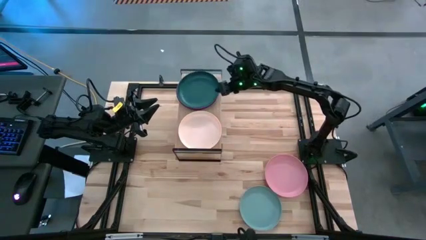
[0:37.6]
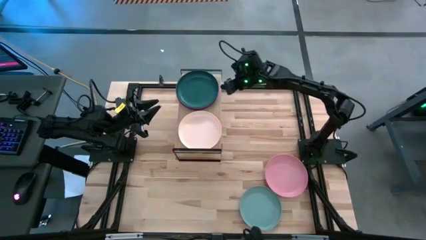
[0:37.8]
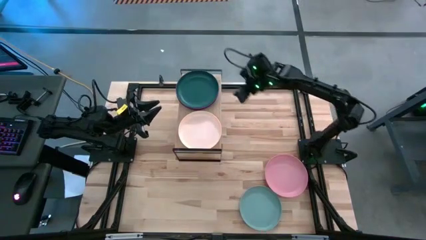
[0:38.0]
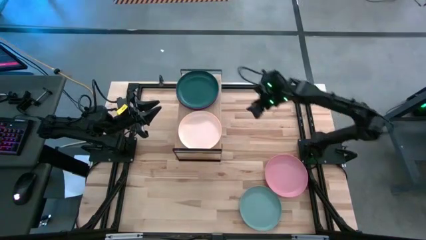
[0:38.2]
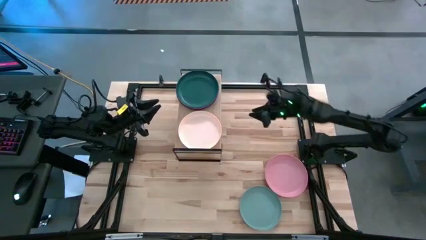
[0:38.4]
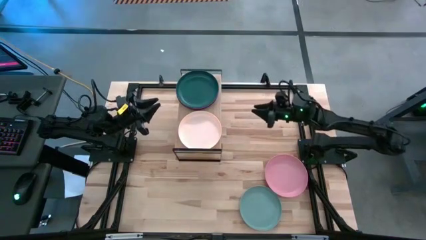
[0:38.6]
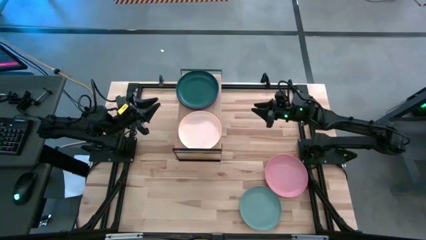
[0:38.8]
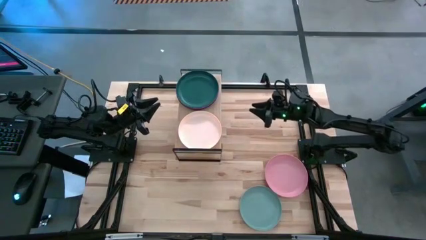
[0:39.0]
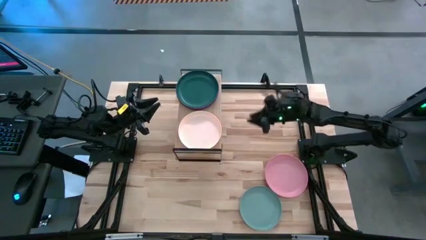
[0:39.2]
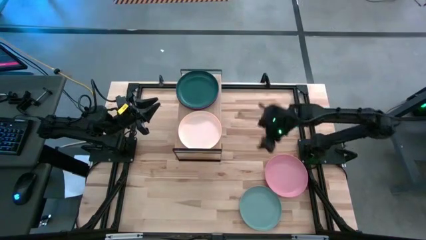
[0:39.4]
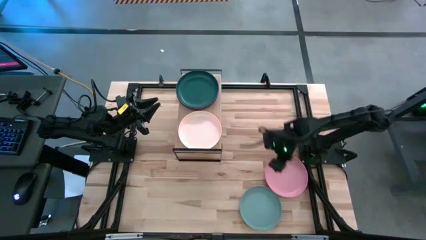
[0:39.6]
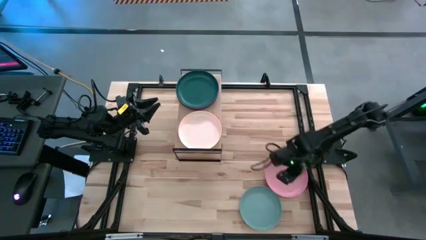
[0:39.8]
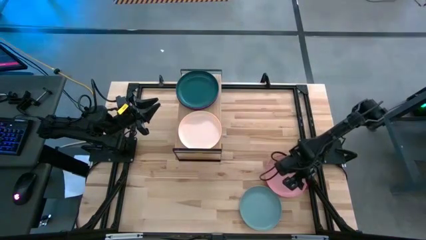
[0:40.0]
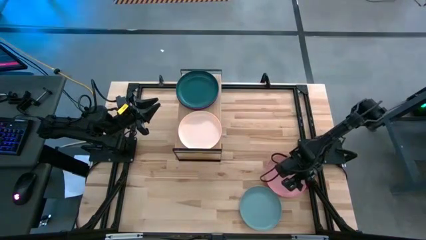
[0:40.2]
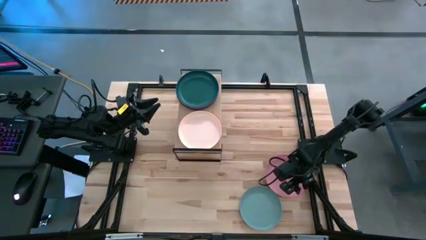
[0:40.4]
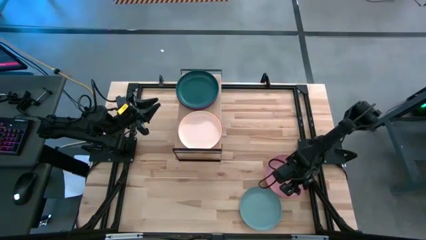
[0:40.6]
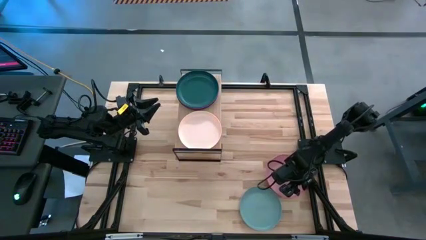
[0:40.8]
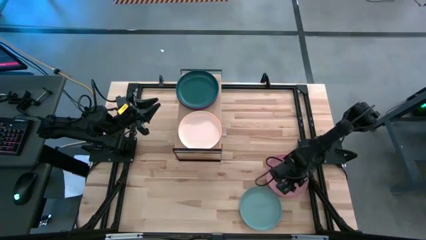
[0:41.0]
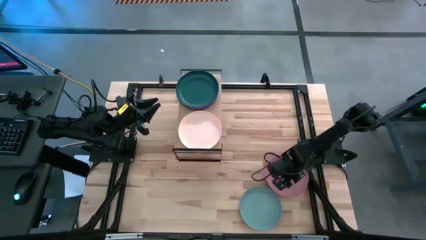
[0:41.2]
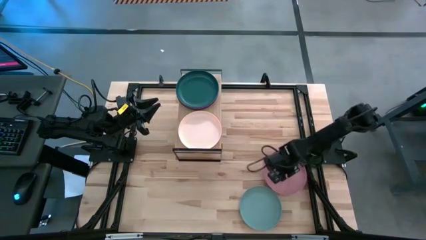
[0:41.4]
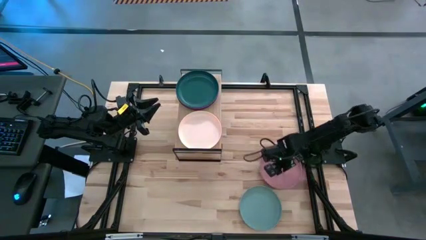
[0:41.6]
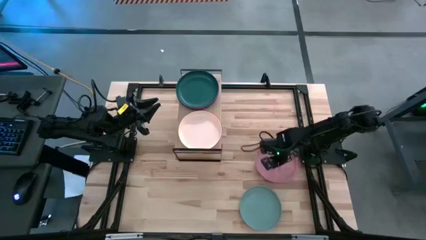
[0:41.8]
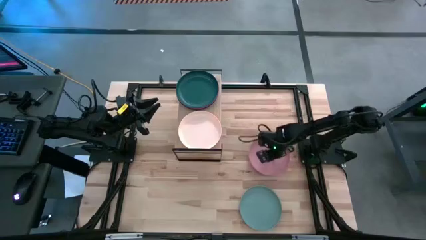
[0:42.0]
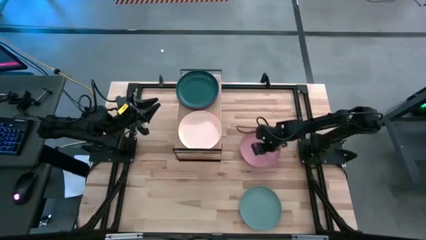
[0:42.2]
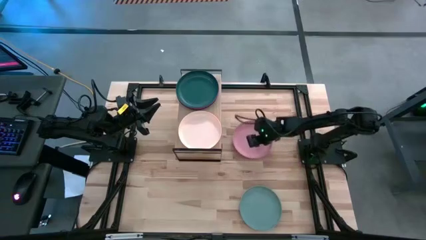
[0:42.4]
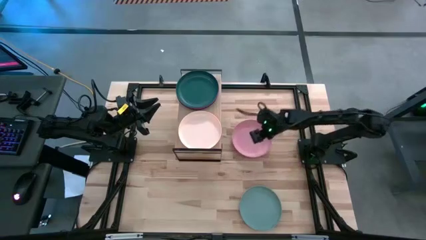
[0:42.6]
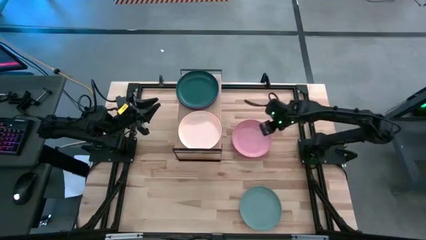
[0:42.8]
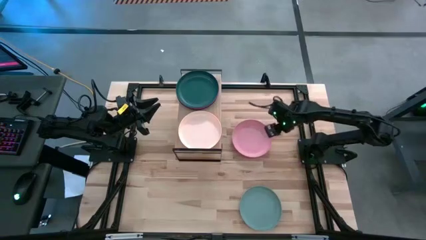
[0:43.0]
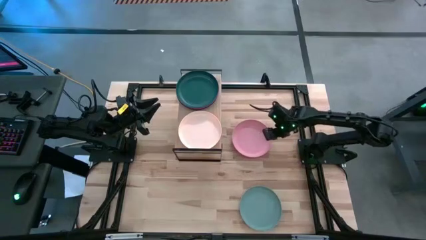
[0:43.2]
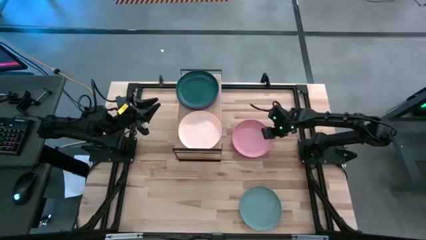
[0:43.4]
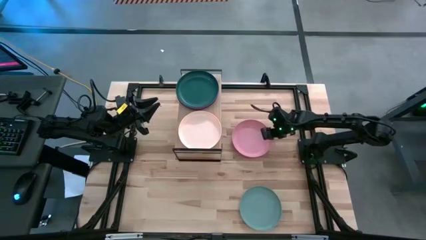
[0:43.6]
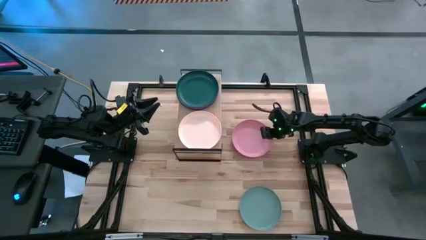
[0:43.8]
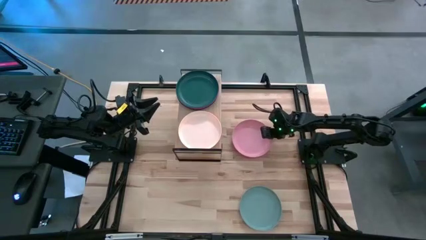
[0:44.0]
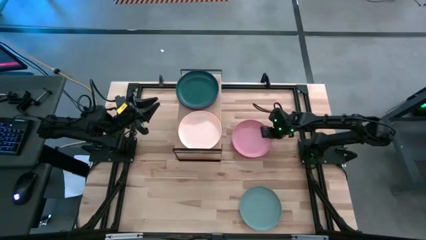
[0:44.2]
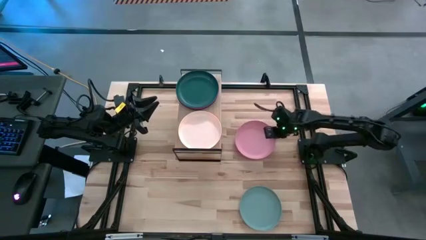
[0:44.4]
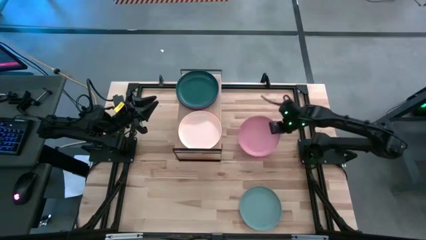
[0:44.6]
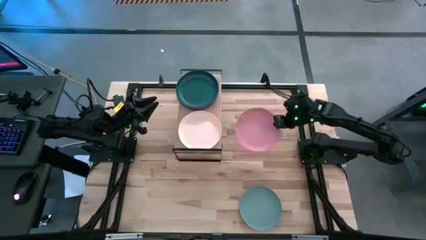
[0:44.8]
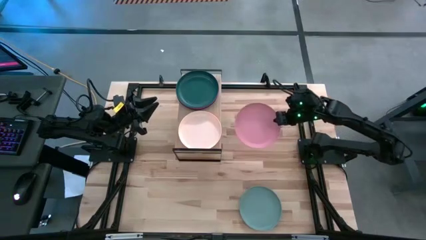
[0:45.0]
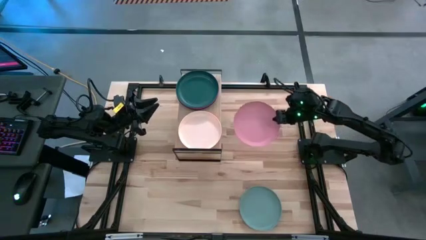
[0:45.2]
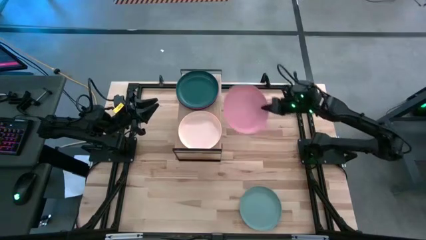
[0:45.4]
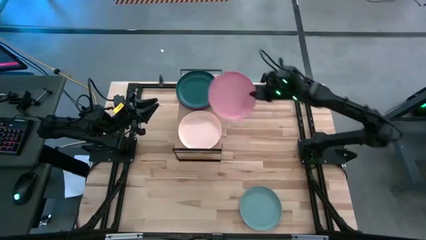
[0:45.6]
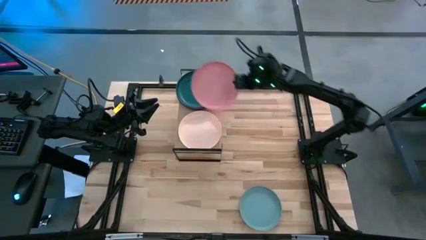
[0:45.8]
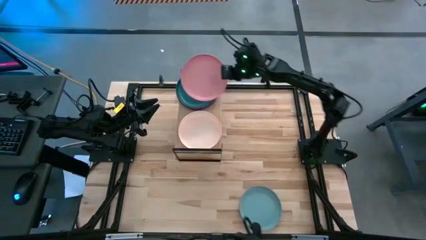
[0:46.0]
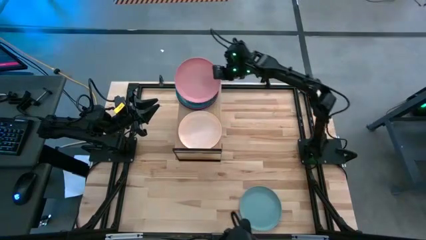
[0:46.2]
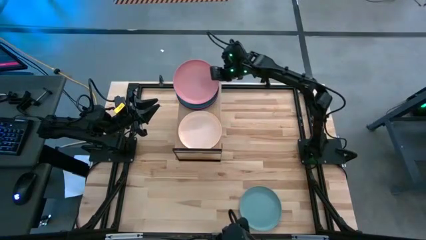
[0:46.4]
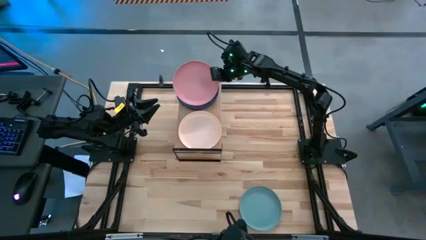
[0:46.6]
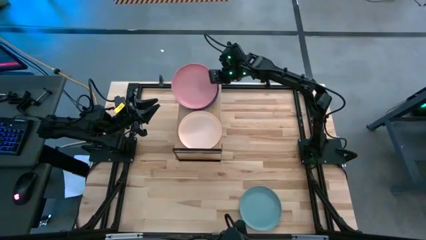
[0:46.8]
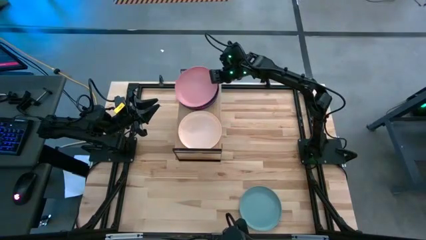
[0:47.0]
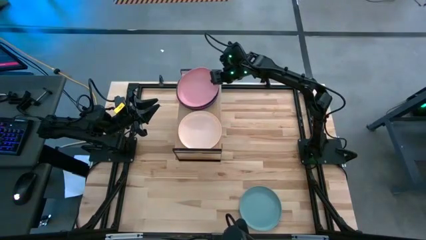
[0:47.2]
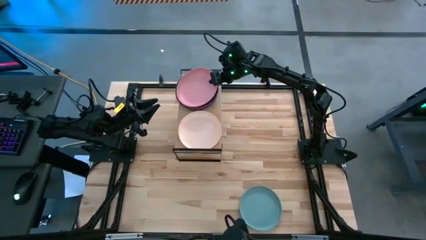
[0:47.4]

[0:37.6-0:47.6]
Task: Place and stack plates onto a shelf
Stack the light pink plate on top of the dark green plate on the shelf
